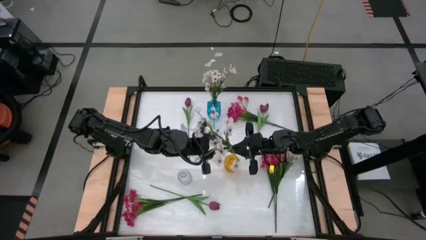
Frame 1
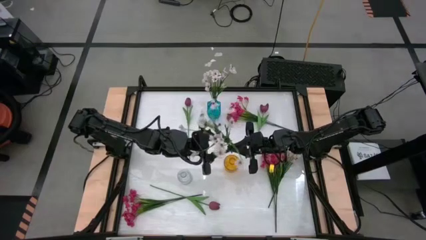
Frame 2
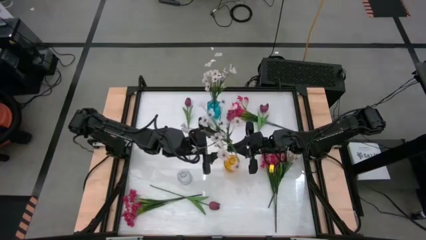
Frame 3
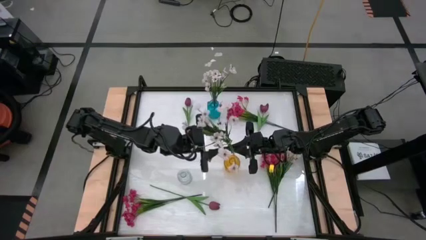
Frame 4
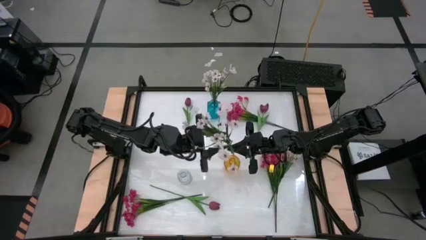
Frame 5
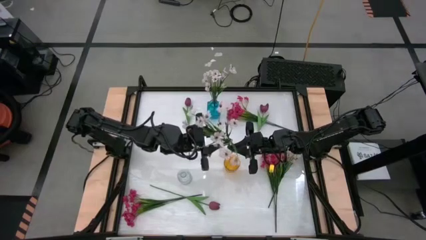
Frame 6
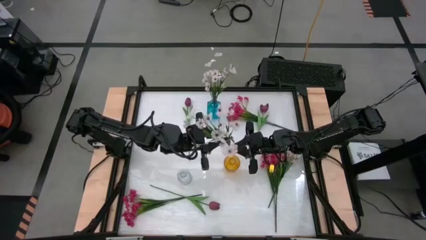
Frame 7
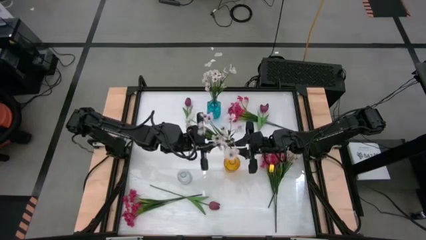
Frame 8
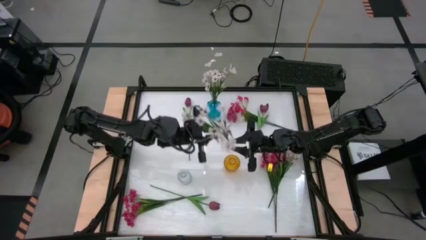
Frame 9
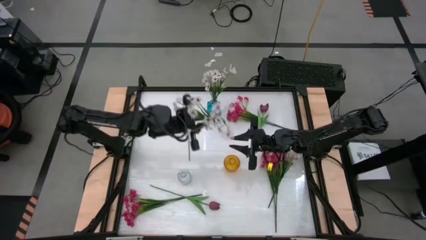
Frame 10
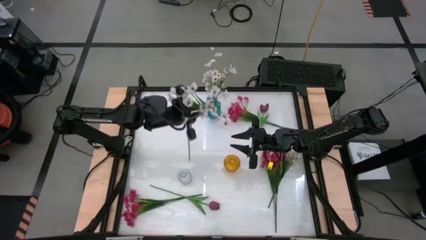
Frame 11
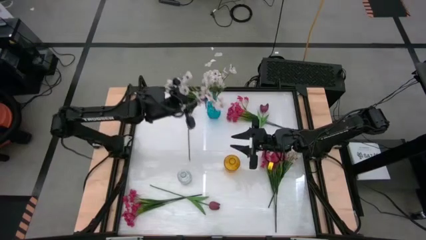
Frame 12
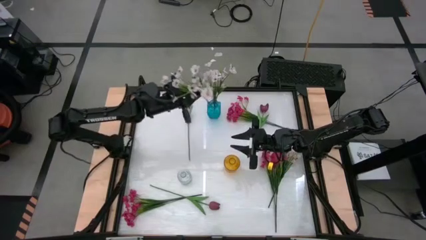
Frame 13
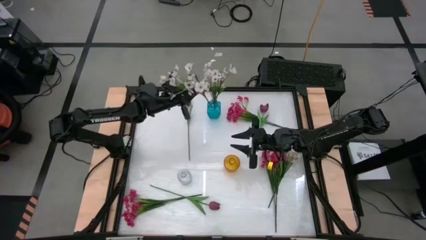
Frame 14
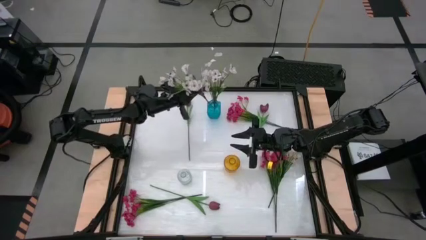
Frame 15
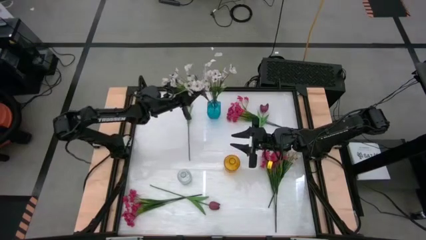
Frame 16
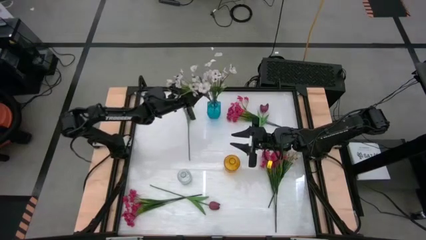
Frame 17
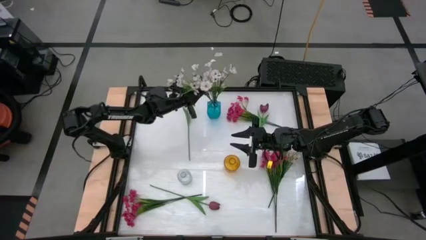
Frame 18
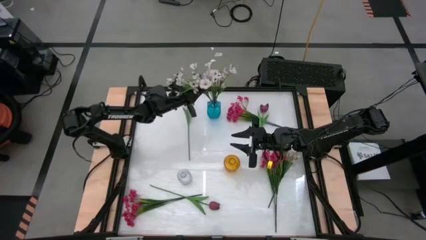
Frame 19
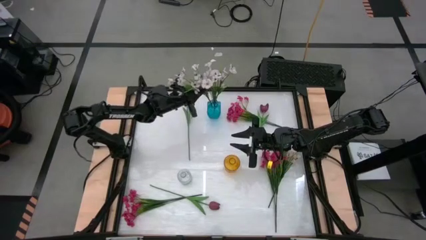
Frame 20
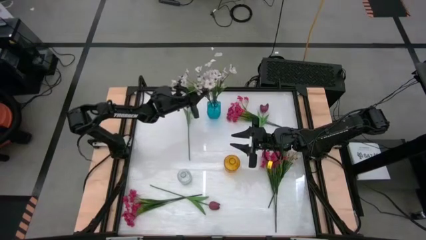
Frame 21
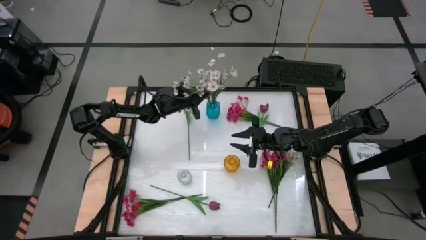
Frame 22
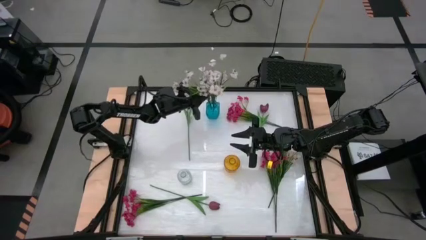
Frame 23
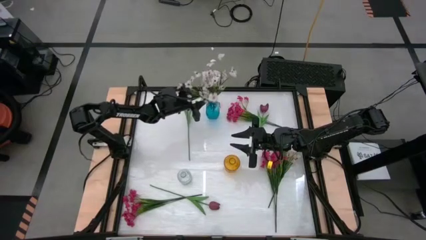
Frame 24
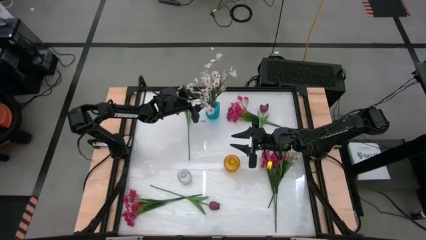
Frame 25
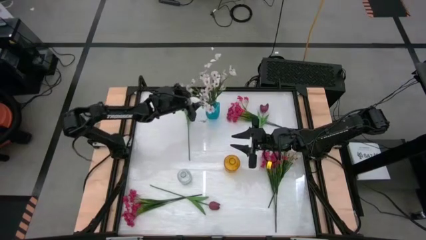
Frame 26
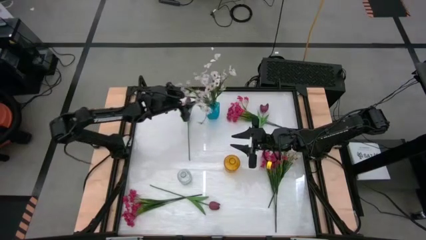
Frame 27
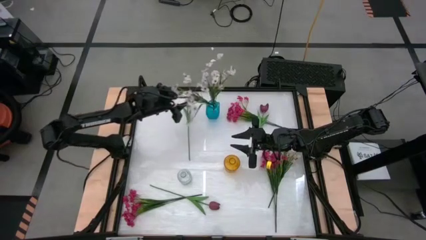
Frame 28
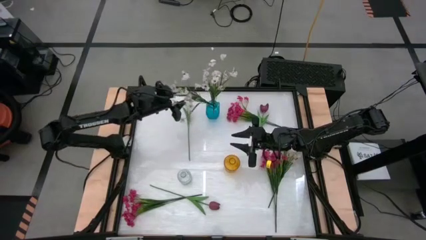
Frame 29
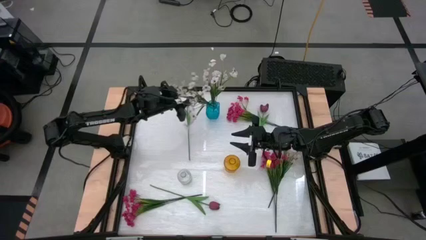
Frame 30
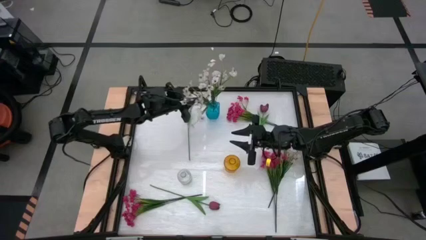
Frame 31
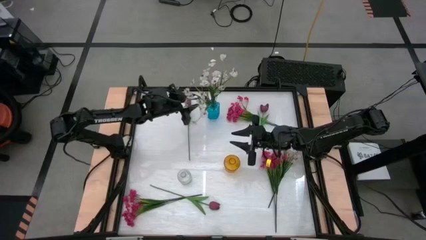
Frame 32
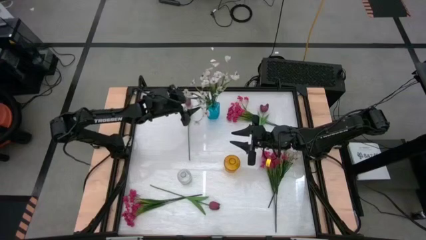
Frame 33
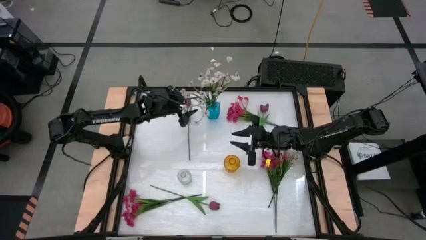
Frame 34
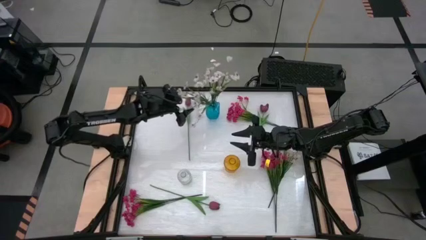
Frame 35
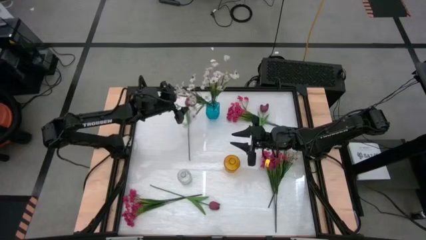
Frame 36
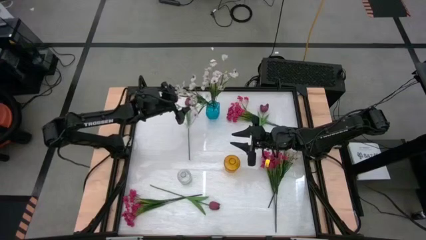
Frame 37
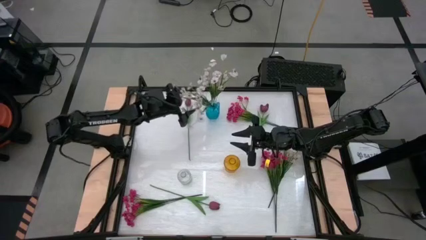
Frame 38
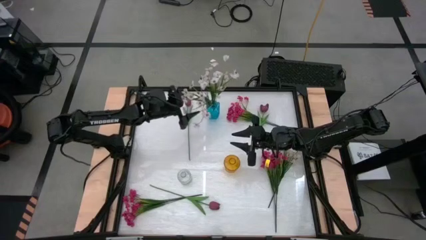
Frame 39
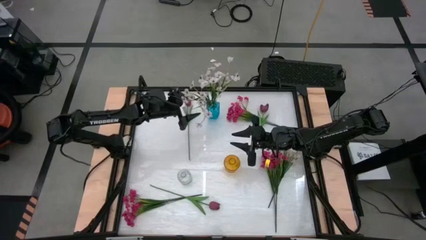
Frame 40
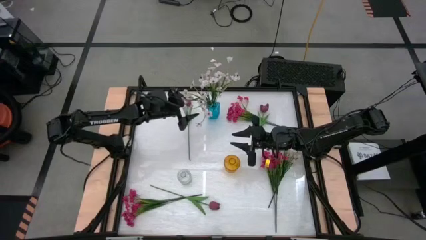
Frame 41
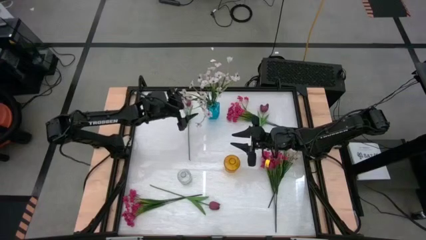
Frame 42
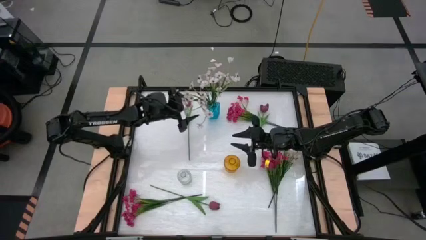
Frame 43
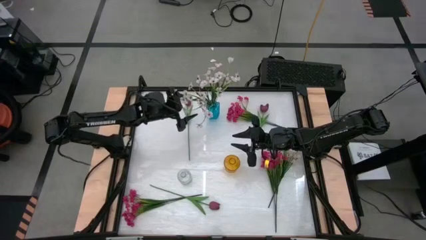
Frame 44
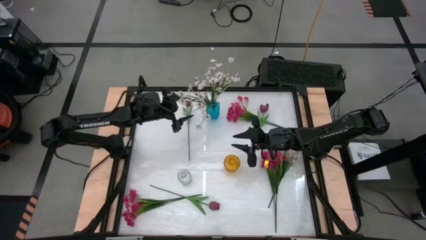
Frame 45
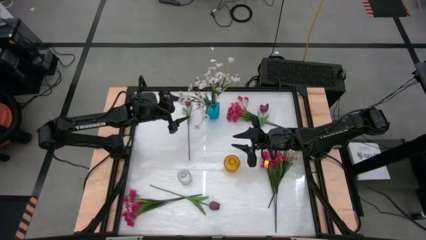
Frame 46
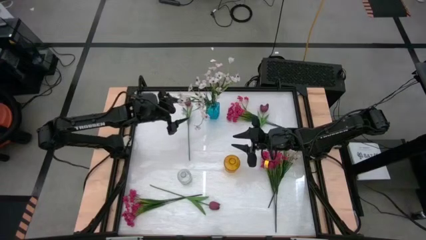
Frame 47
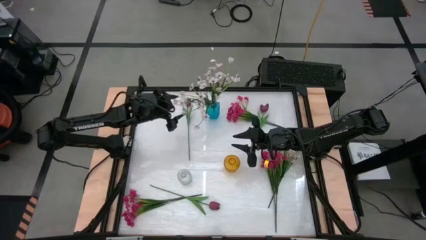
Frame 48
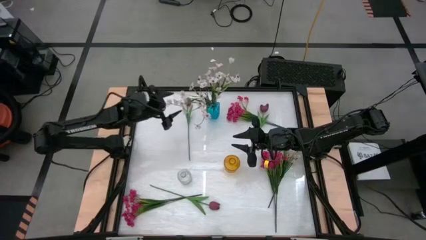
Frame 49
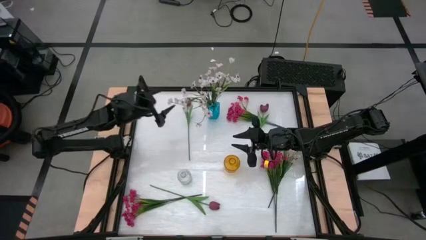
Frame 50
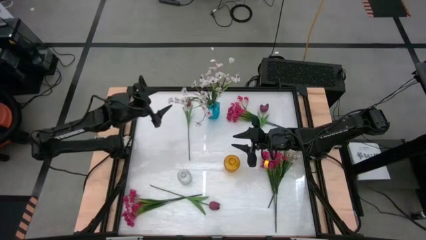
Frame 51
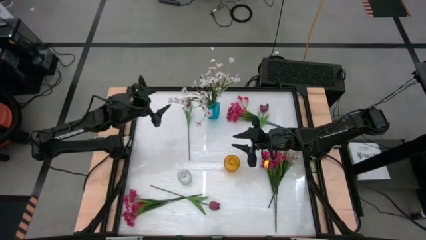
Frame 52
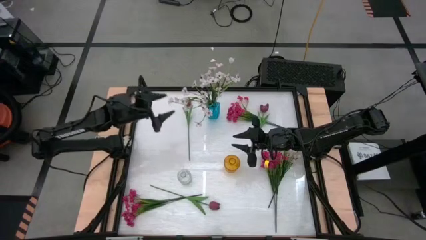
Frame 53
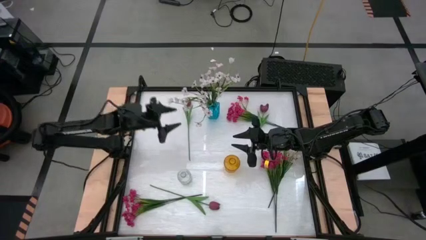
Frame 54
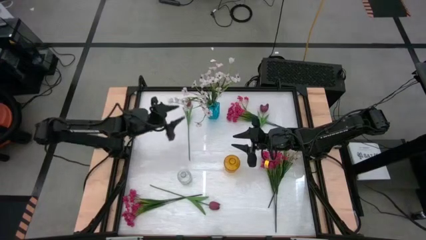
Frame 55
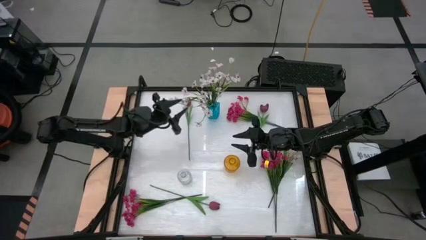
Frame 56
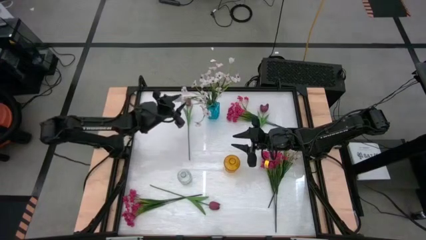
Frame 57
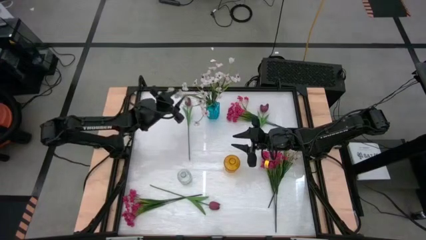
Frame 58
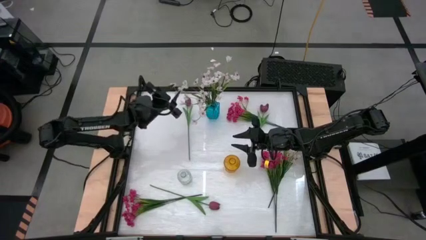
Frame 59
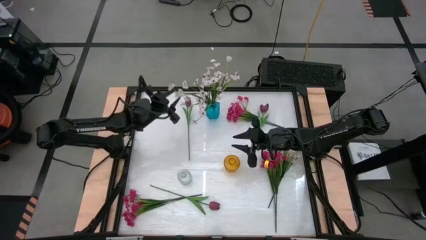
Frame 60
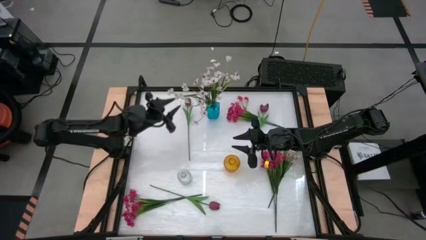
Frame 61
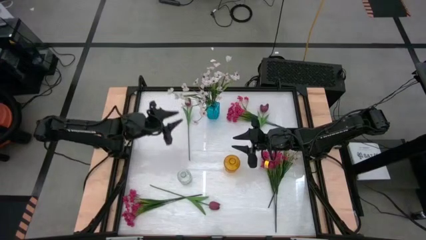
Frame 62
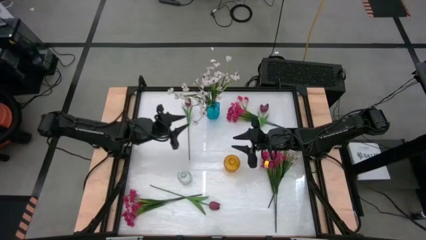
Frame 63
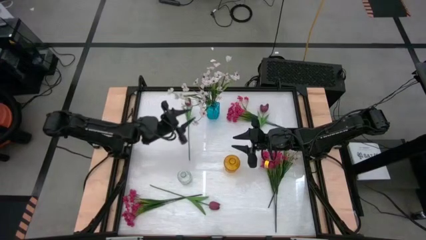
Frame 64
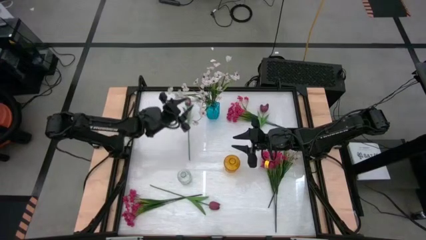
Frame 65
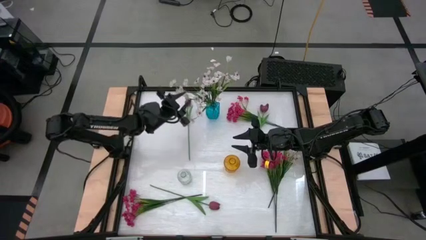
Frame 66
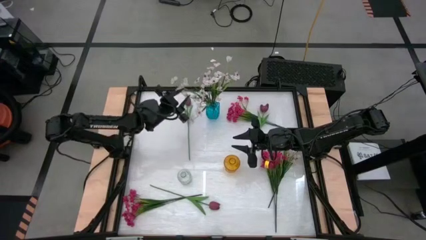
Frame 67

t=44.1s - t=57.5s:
Task: Sort flowers into vase by color
Put the left white flowers into the blue vase
